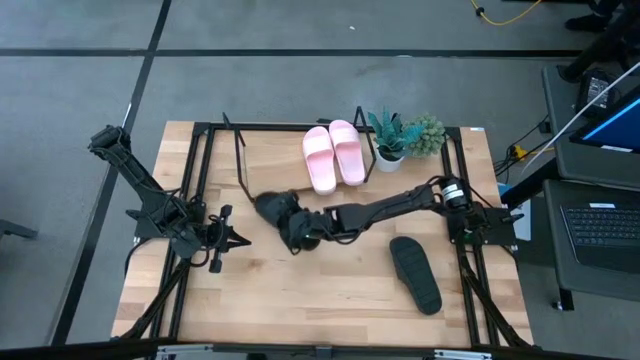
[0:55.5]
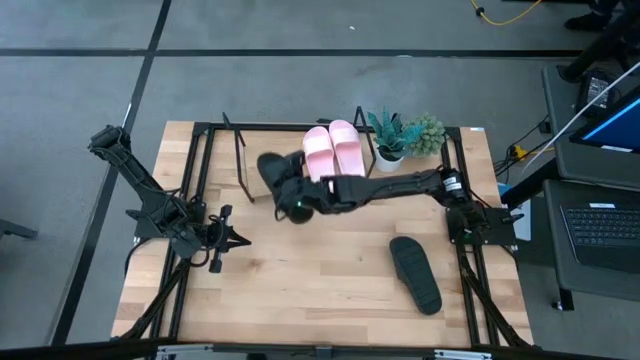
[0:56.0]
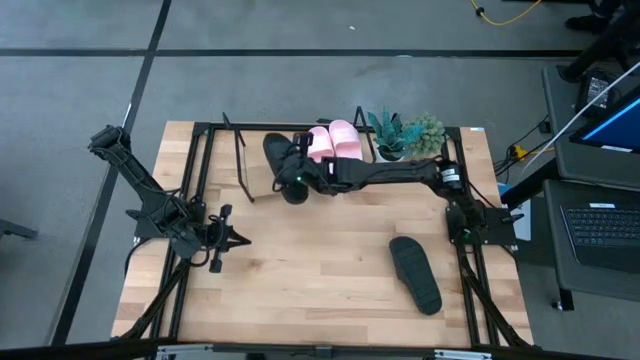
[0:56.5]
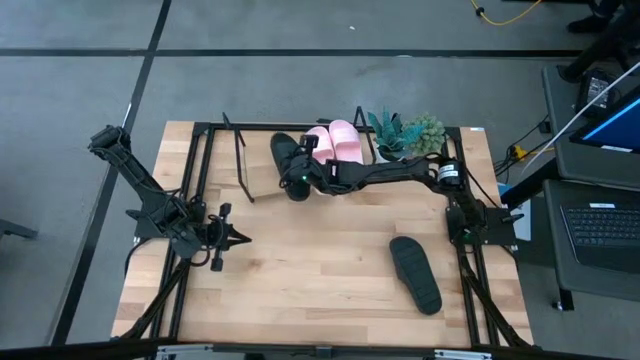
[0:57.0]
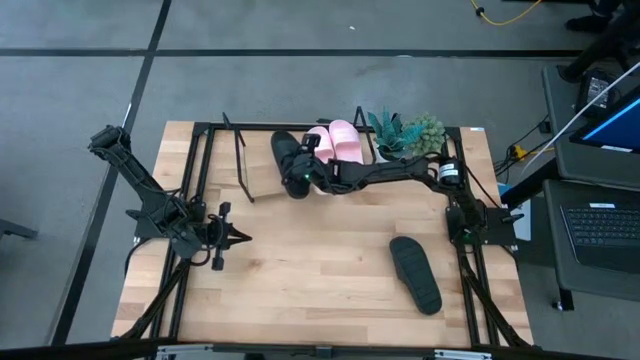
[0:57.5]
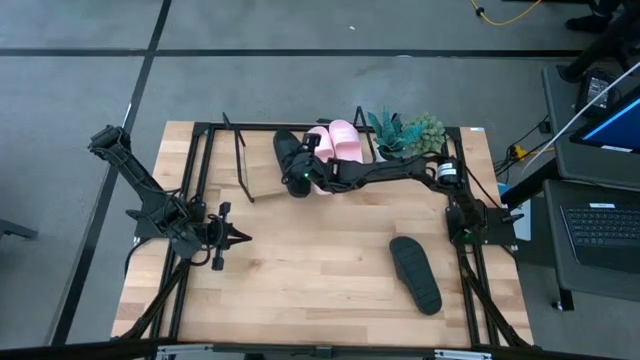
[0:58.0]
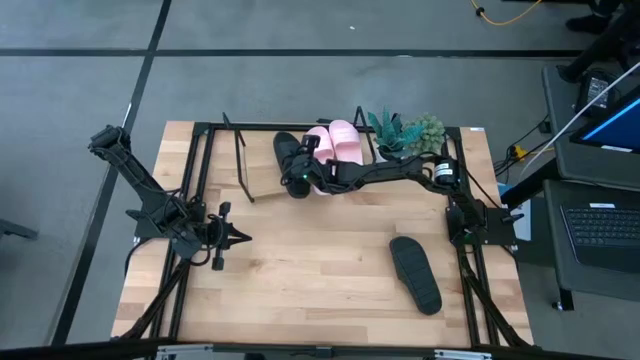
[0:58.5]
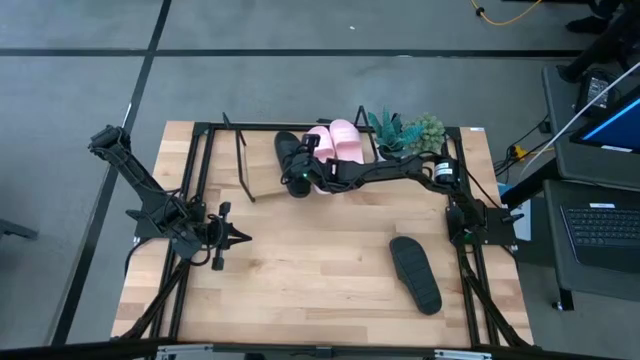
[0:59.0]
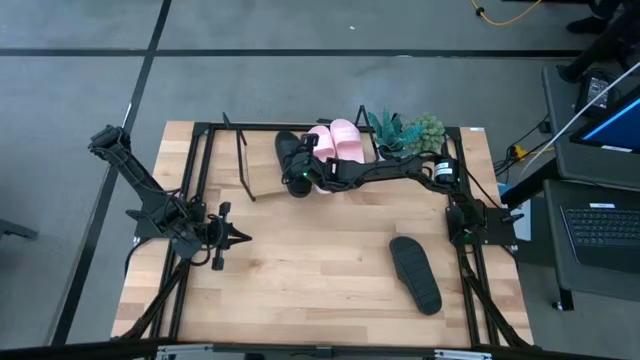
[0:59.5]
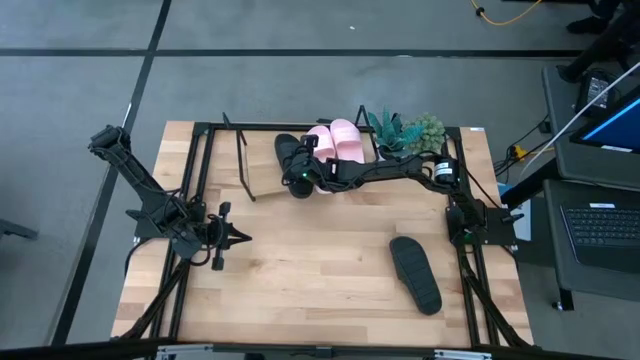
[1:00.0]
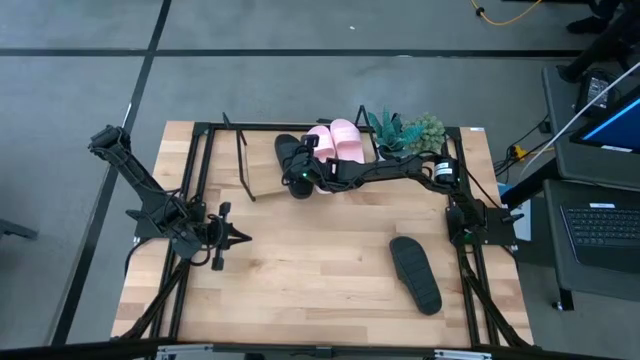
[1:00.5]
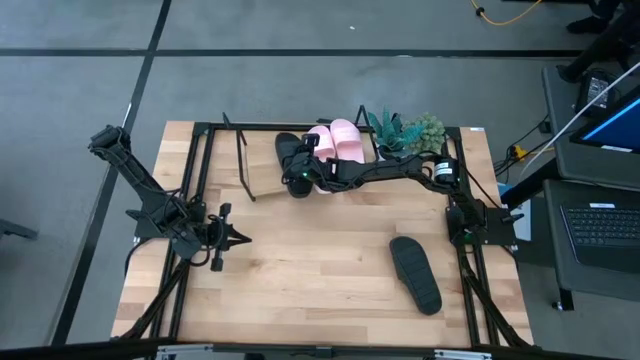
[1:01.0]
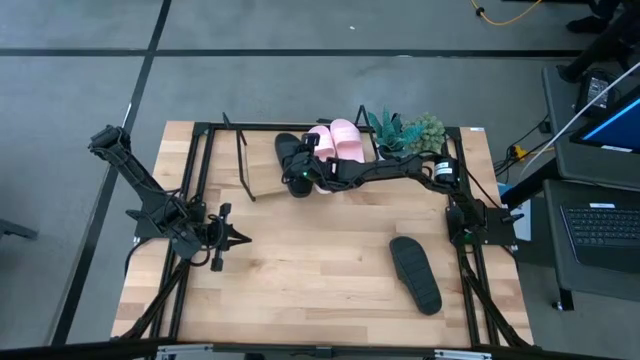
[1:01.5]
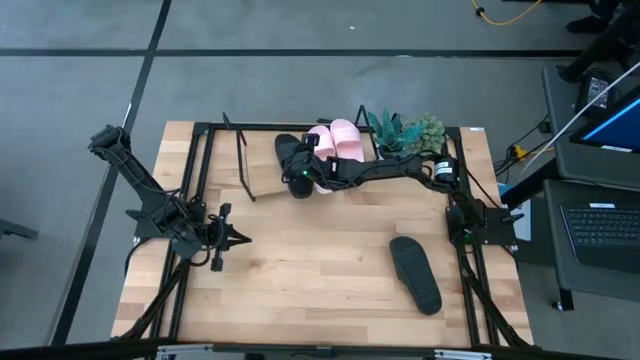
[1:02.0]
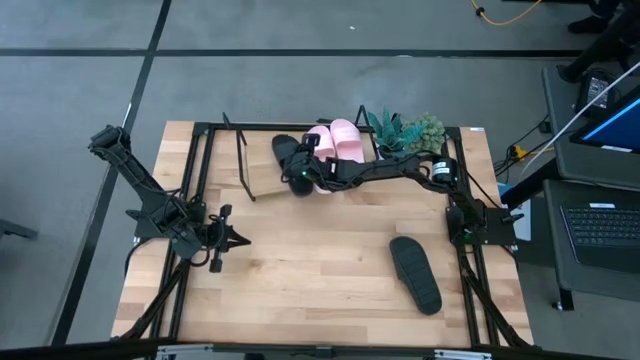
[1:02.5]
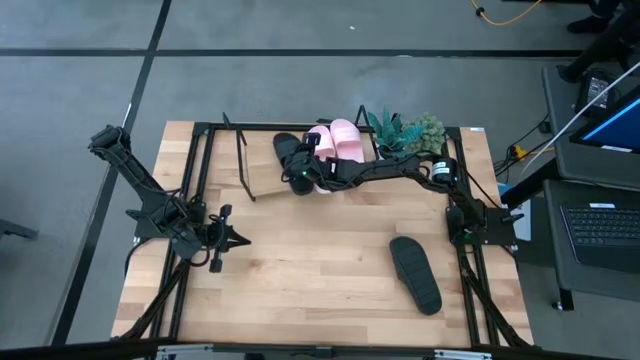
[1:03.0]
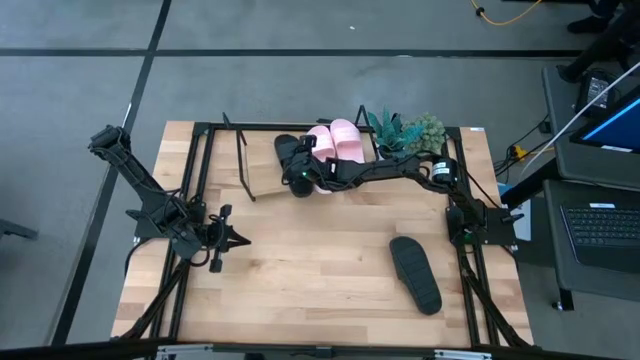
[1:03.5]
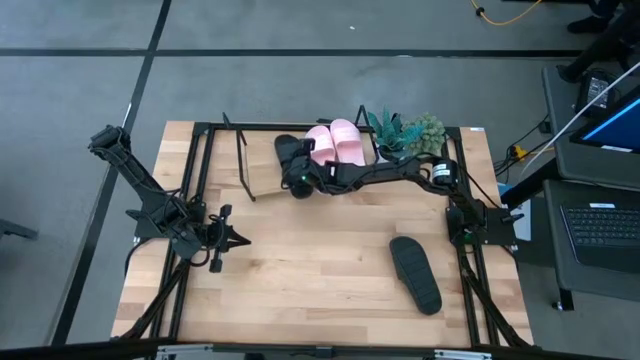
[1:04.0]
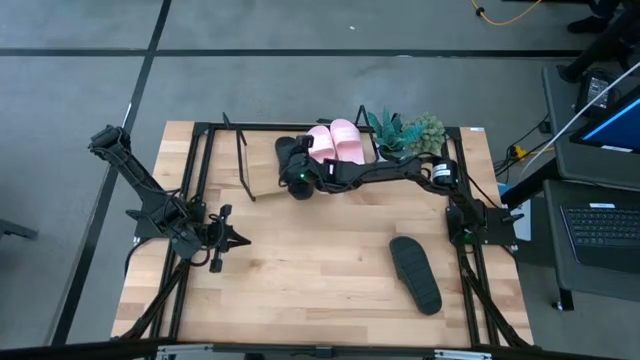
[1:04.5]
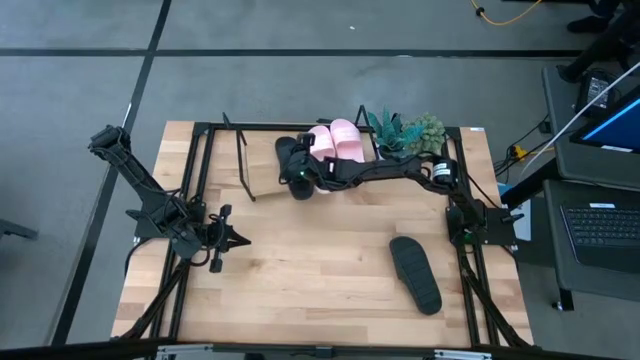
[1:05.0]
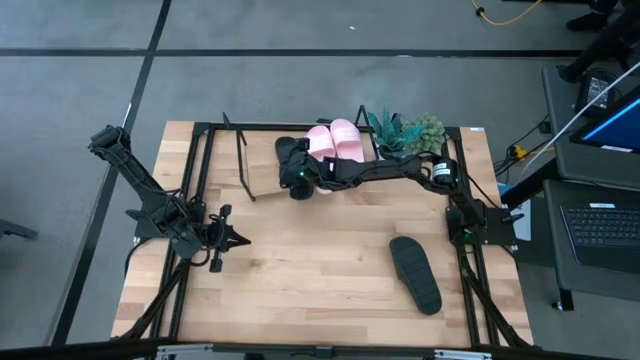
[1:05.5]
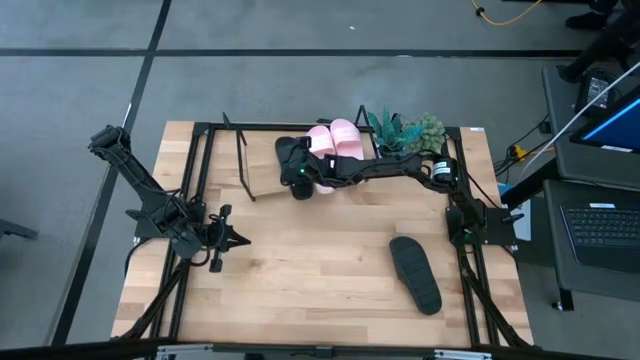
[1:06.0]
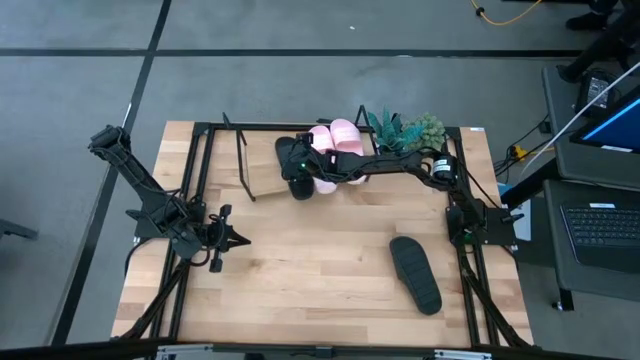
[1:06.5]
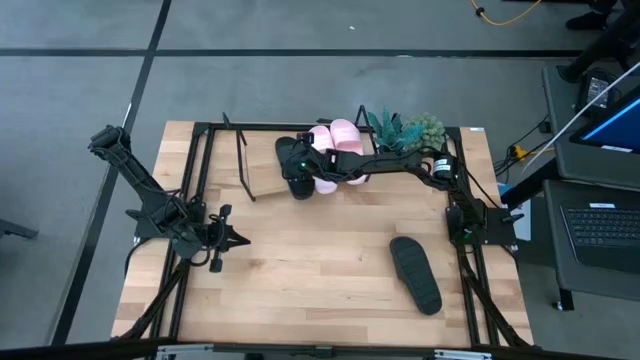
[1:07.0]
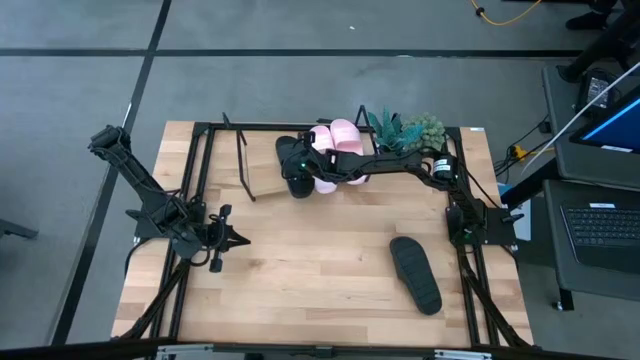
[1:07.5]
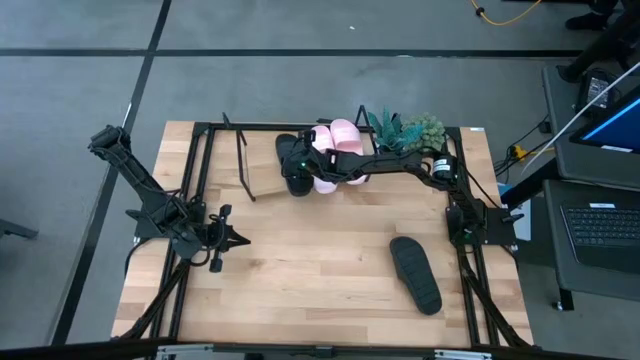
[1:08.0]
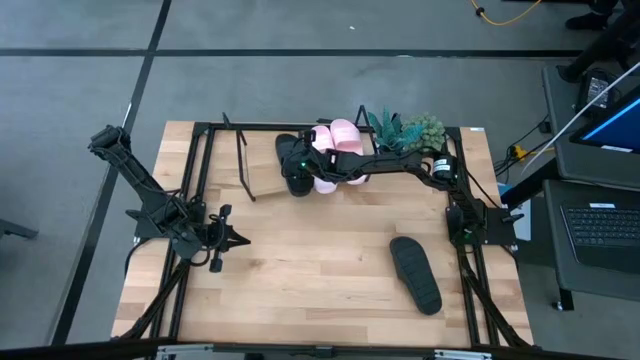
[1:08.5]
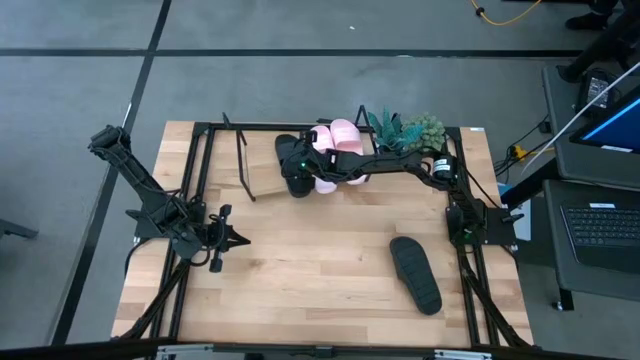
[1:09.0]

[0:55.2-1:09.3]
Task: Pick and place slides into the shelf
Put the left black slide on the shelf

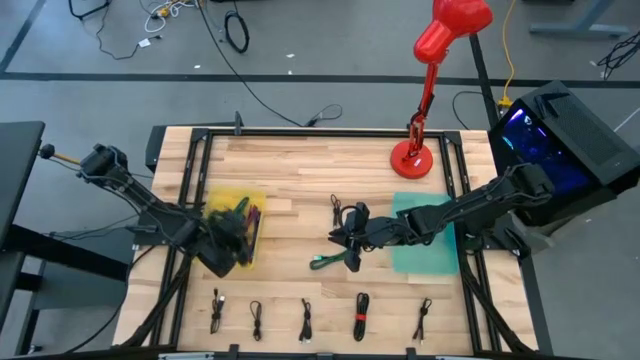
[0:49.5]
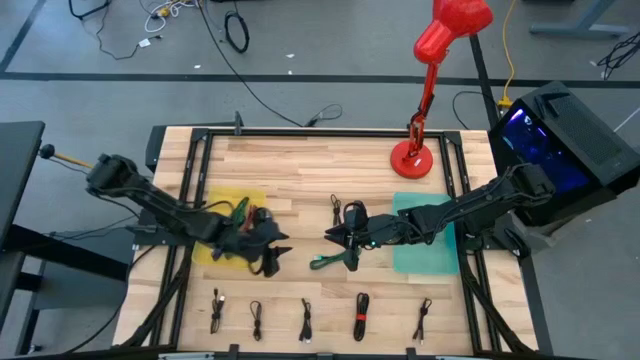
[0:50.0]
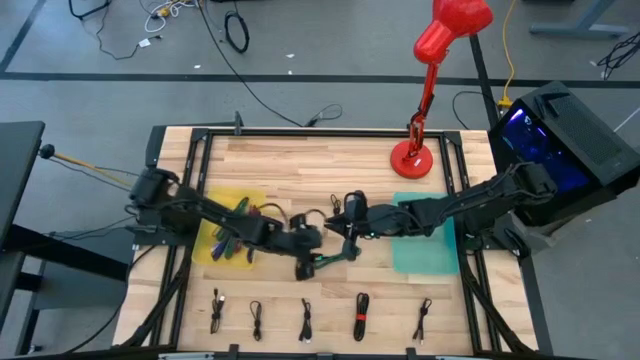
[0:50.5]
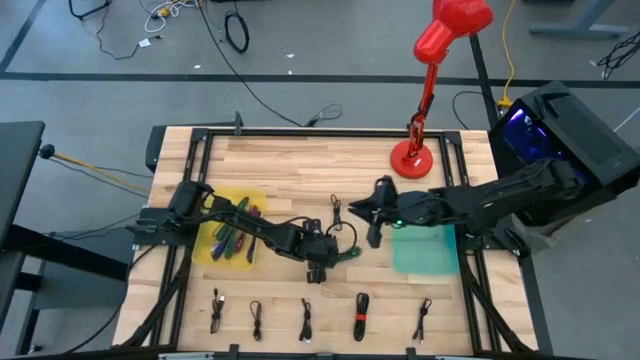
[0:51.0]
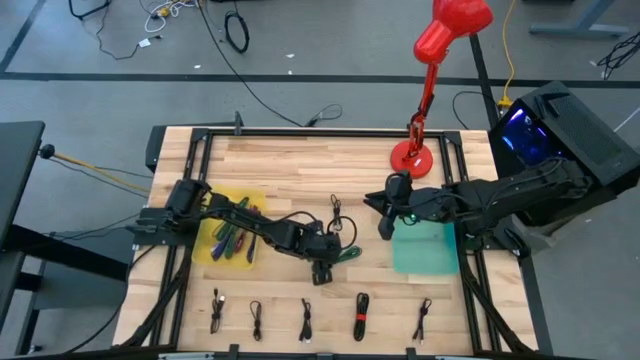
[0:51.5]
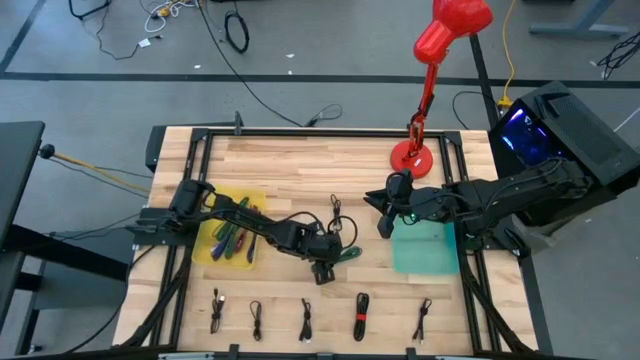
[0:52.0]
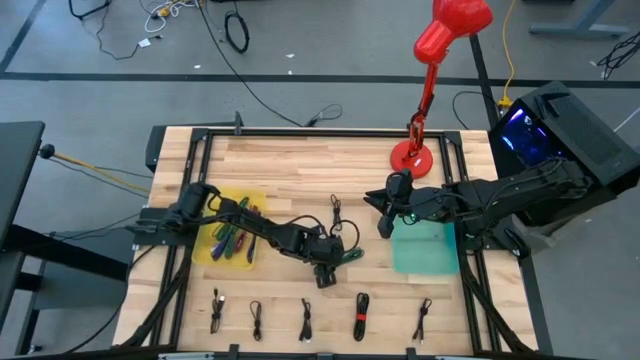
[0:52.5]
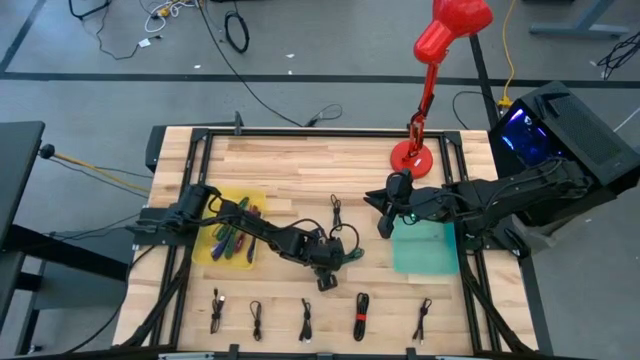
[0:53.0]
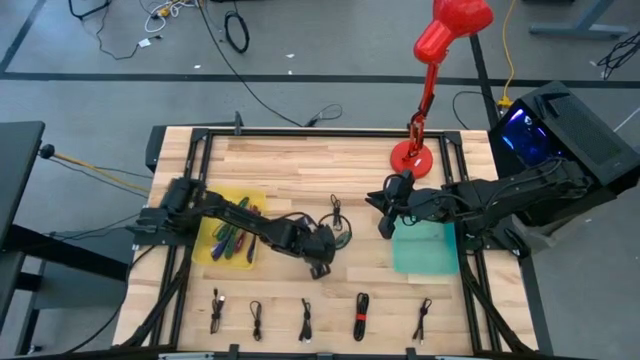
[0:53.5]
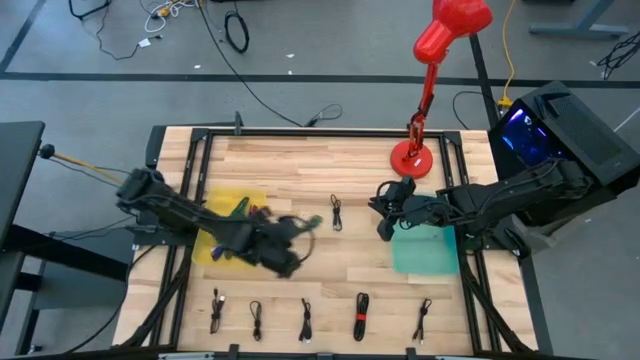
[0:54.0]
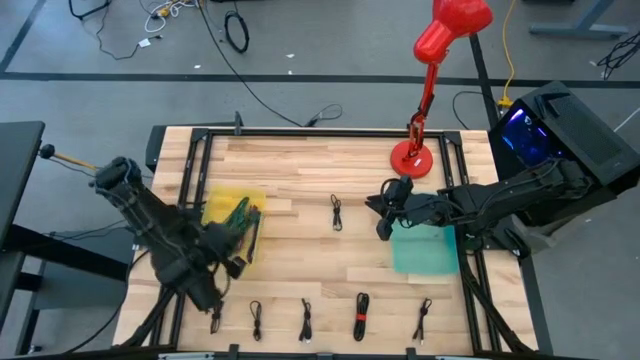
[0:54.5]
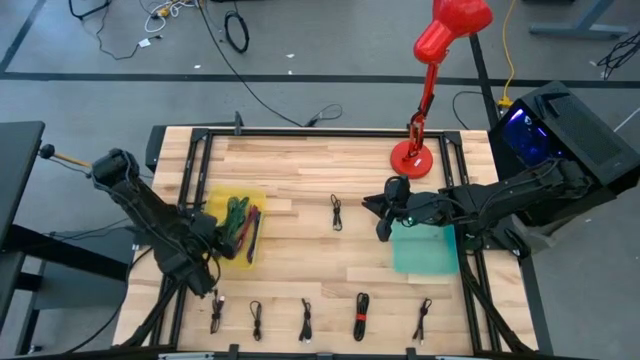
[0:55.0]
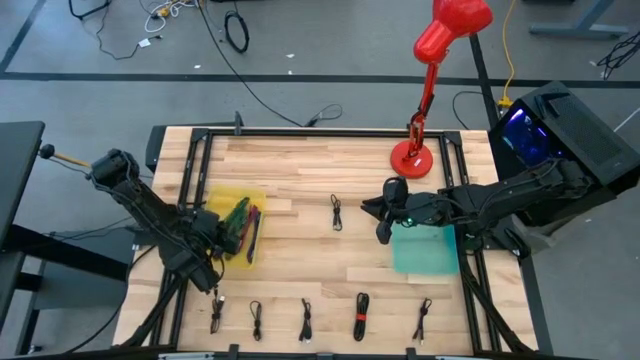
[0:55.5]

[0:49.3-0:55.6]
Task: Pick & Place USB Port
Put the black and green charger cable into the yellow bin
